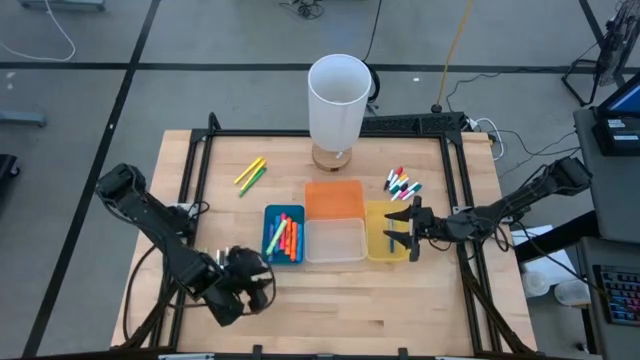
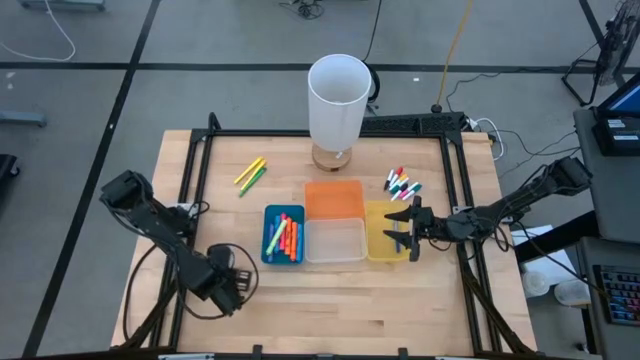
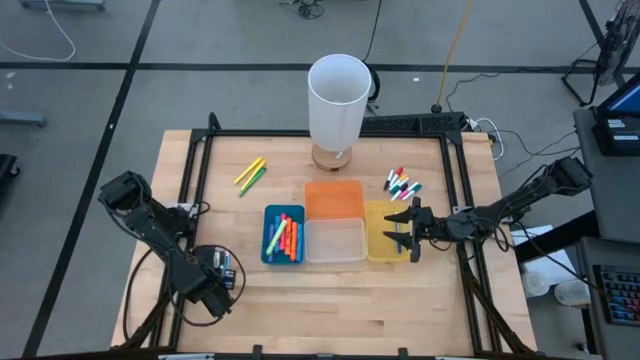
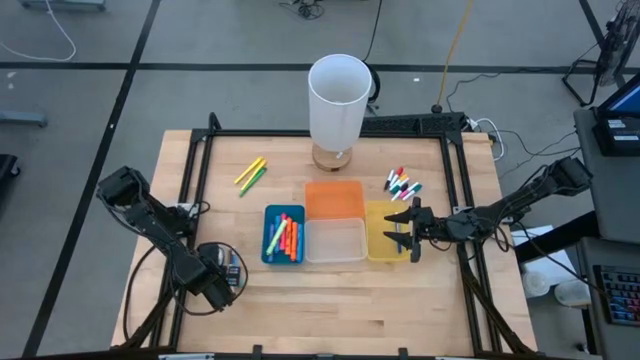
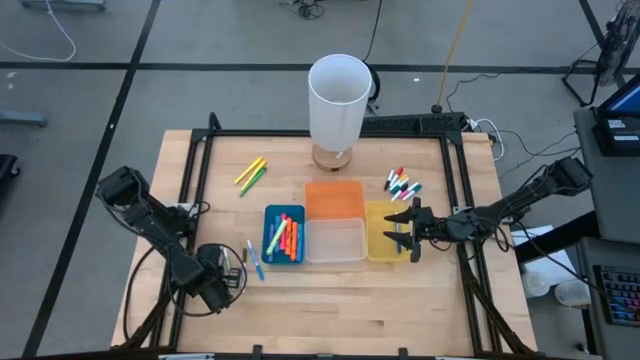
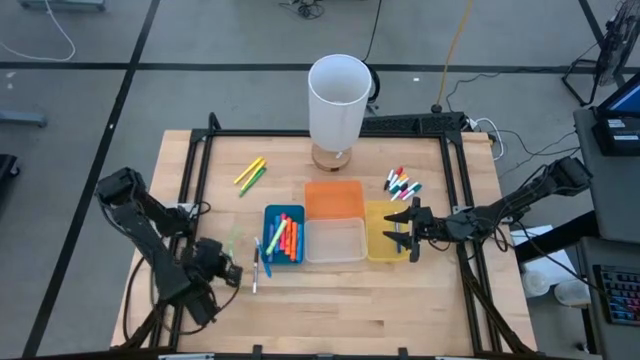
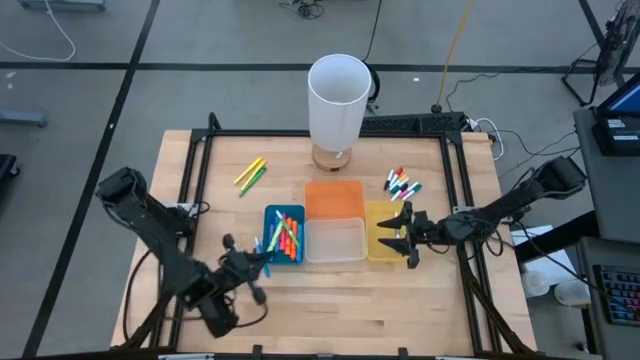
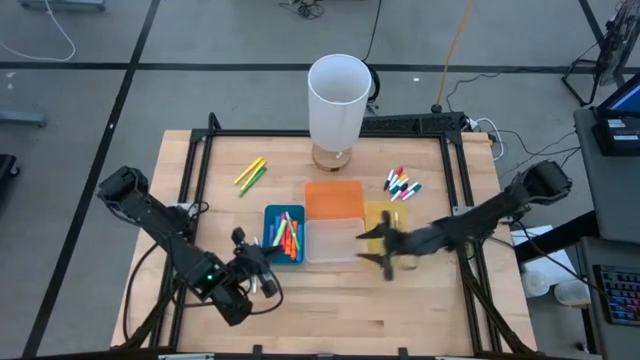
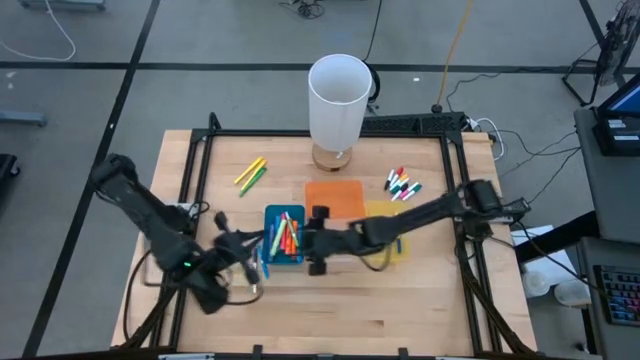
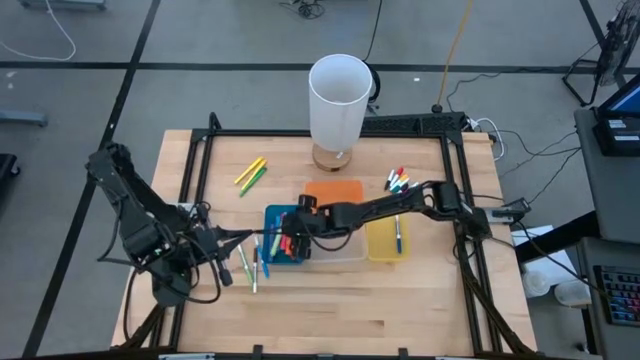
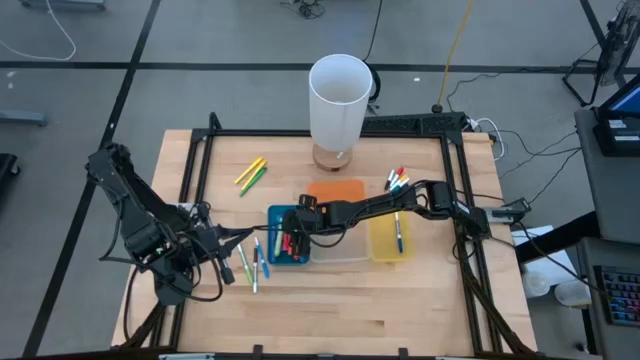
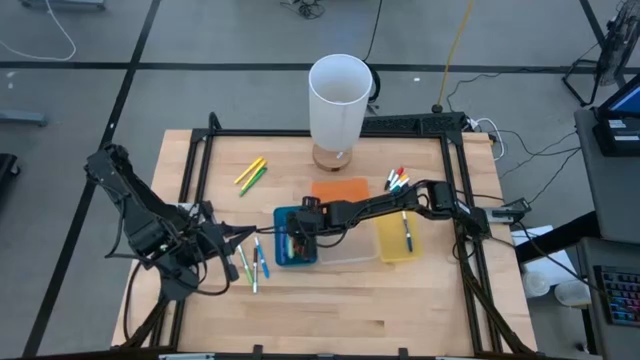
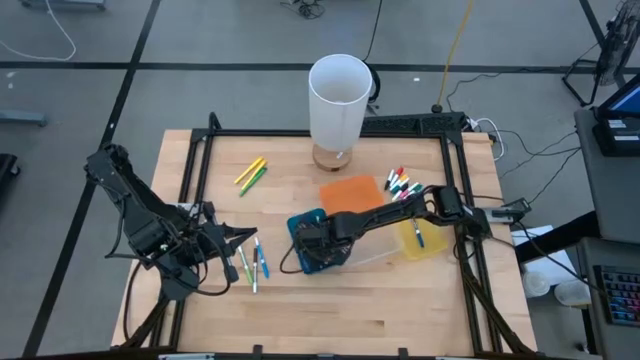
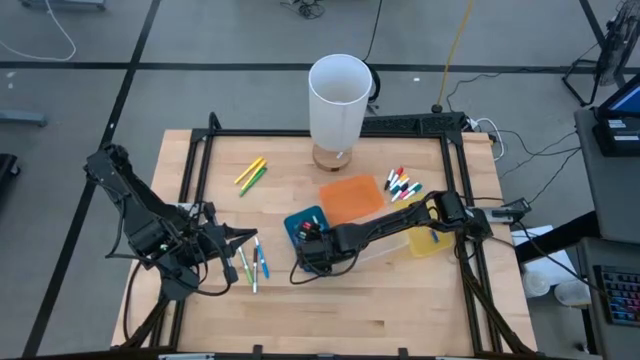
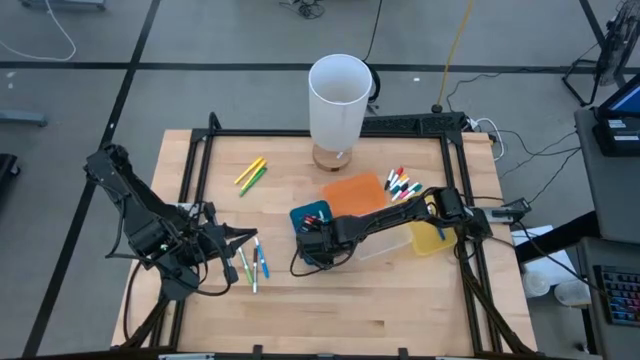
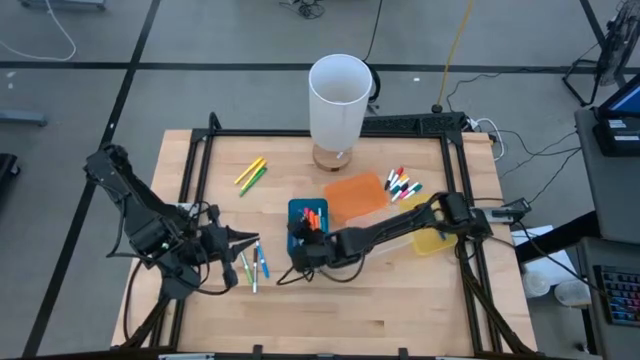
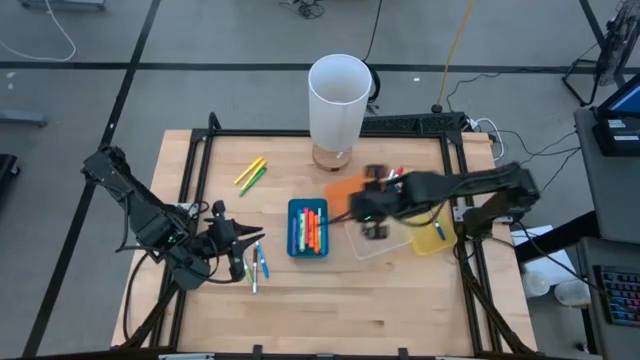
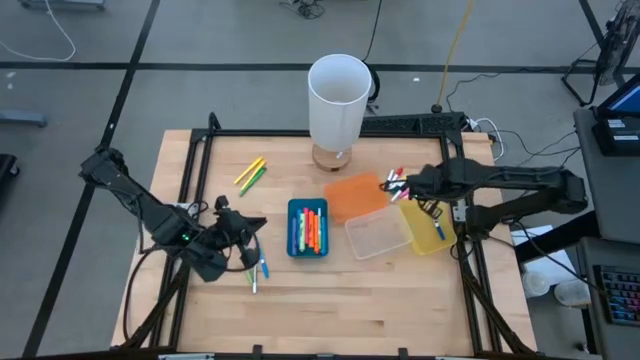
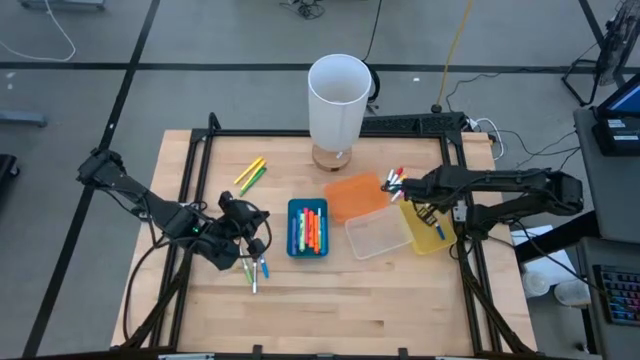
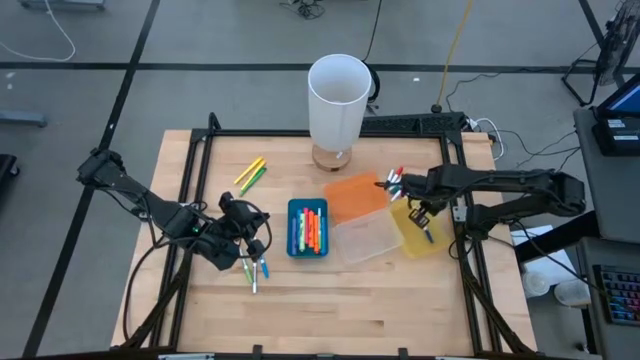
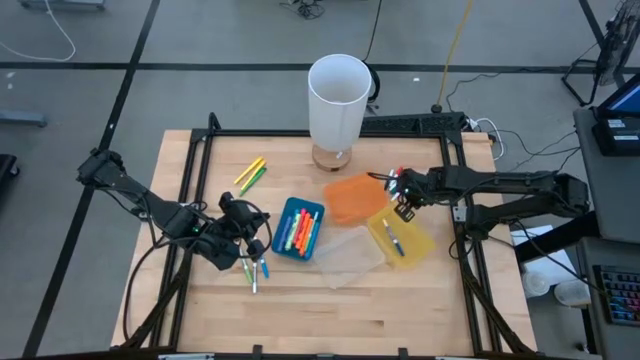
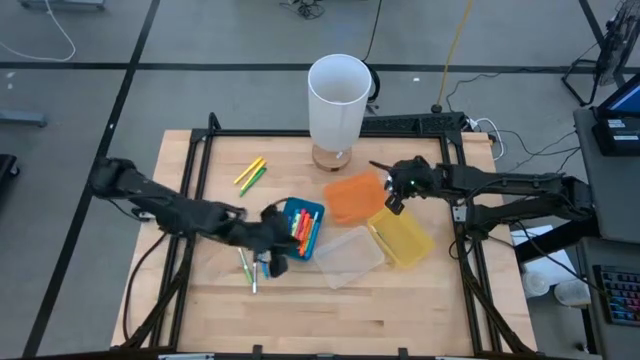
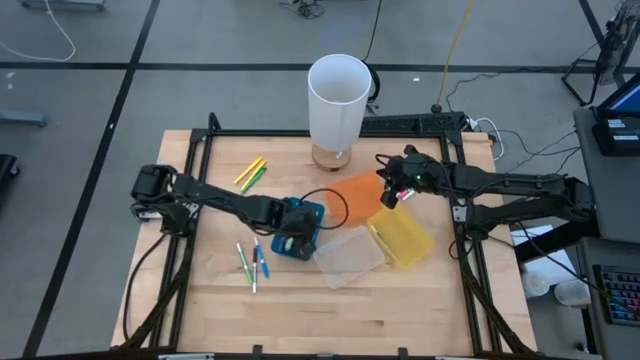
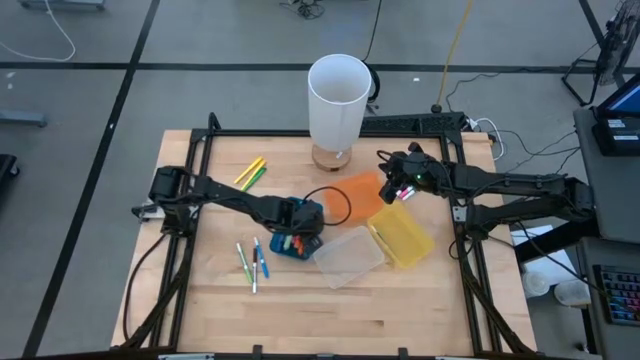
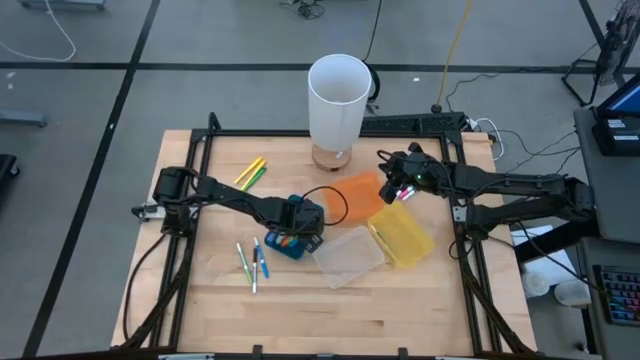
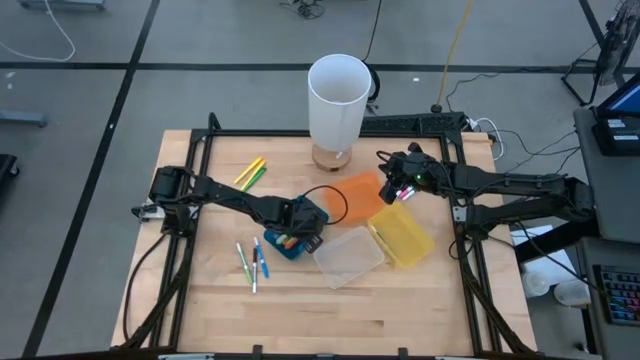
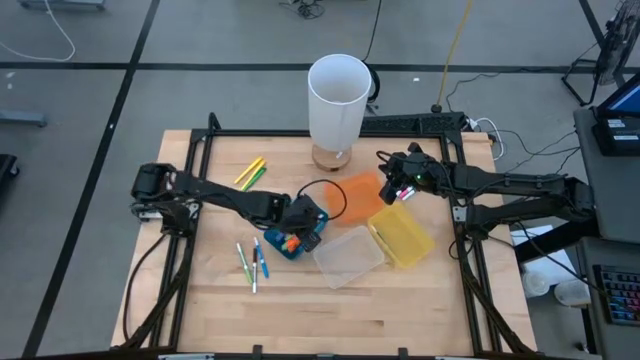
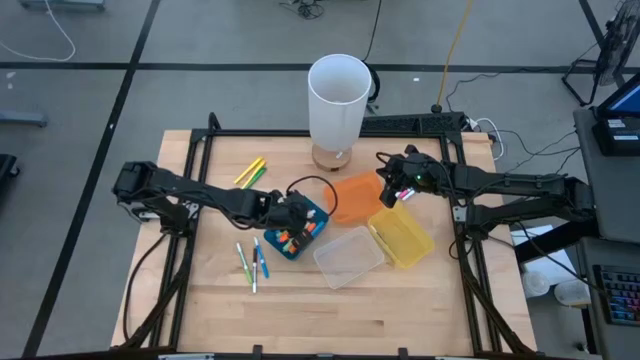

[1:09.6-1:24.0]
Task: Pick & Place Markers
Put the left green marker pen into the yellow bin

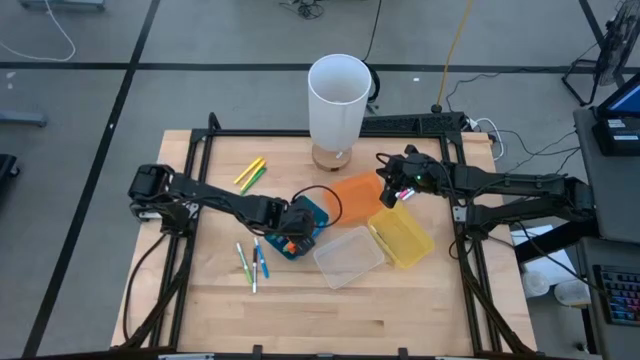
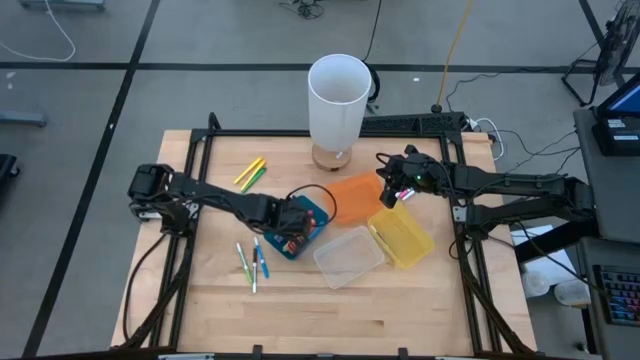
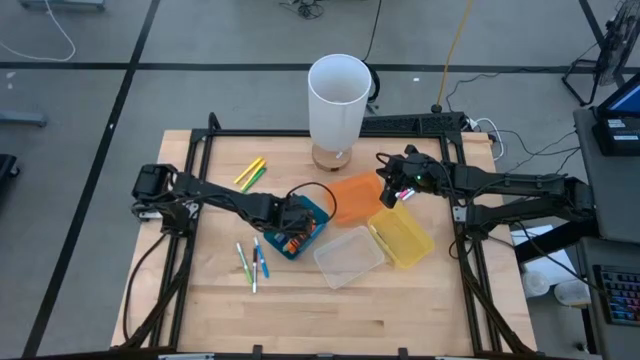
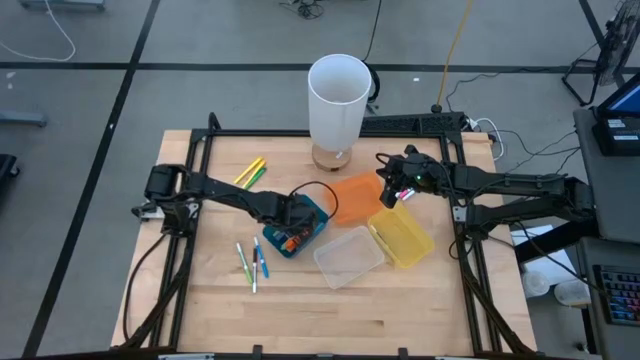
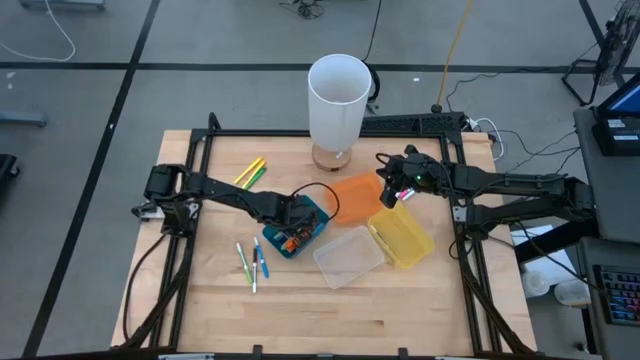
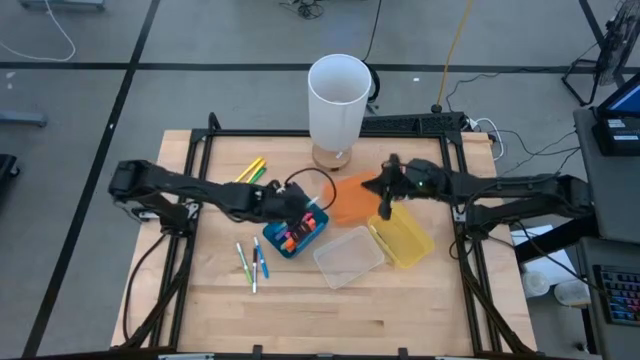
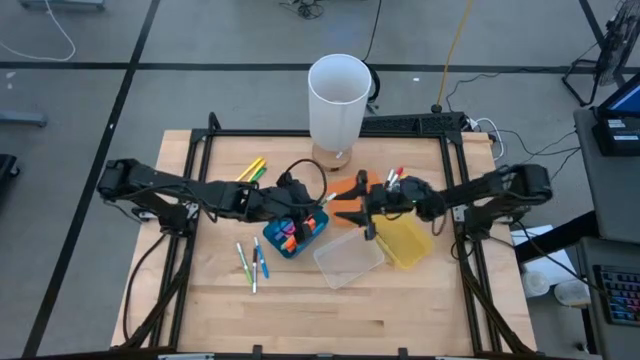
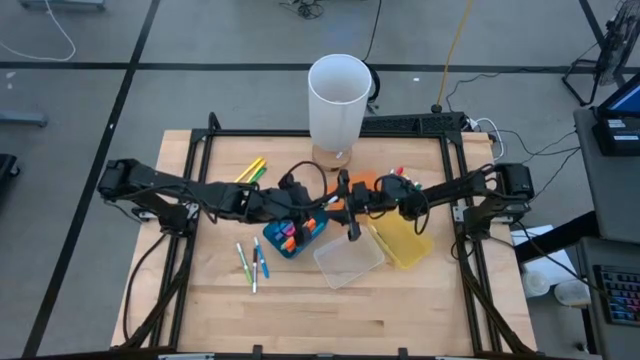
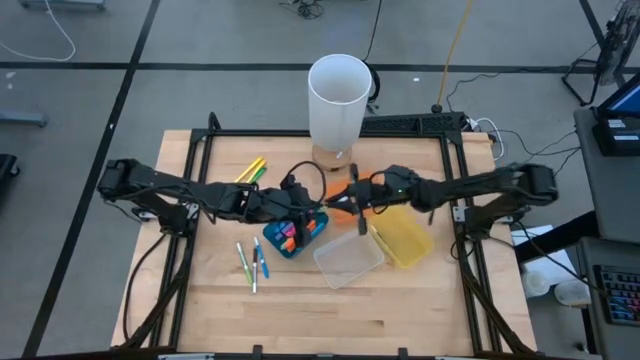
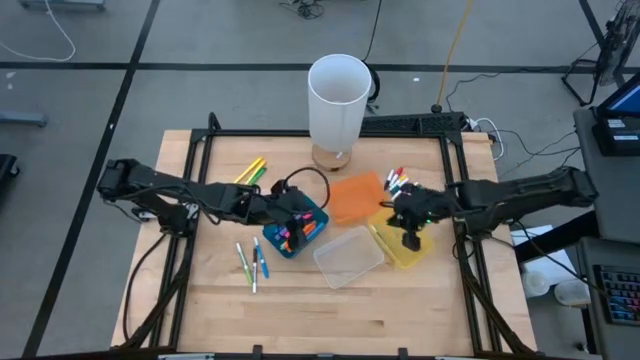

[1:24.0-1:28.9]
Put the left green marker pen into the yellow bin

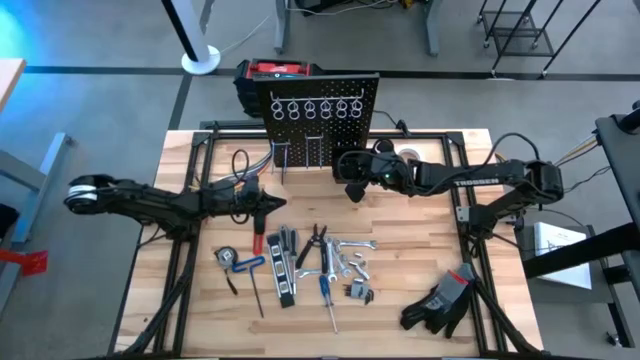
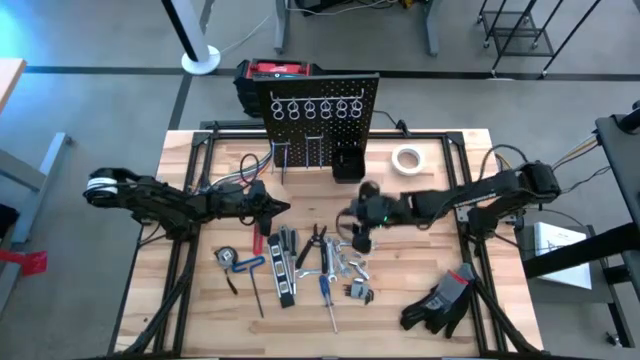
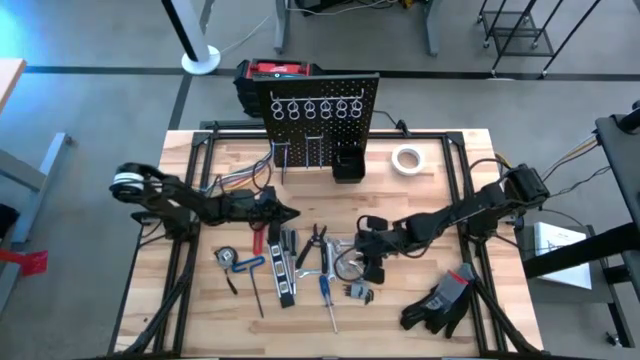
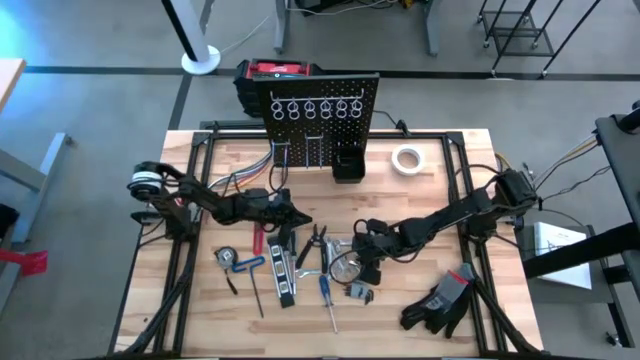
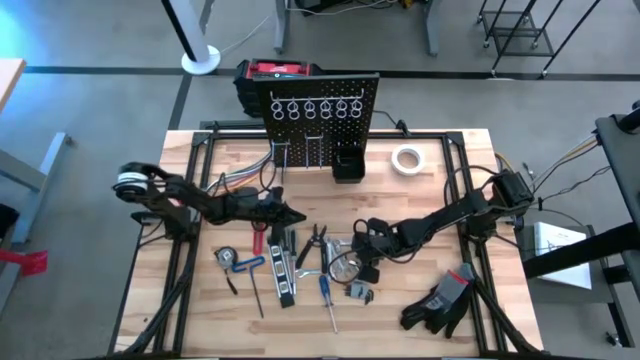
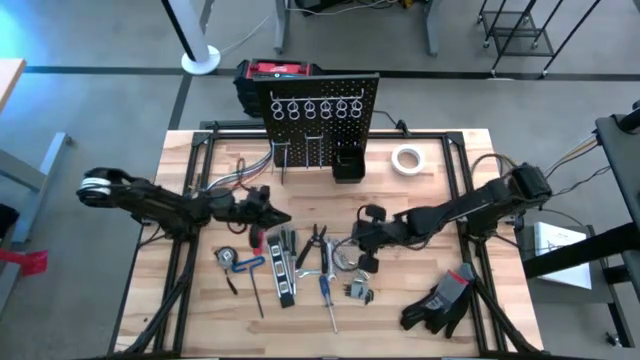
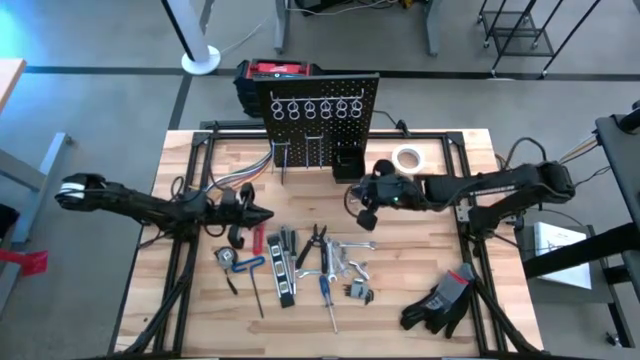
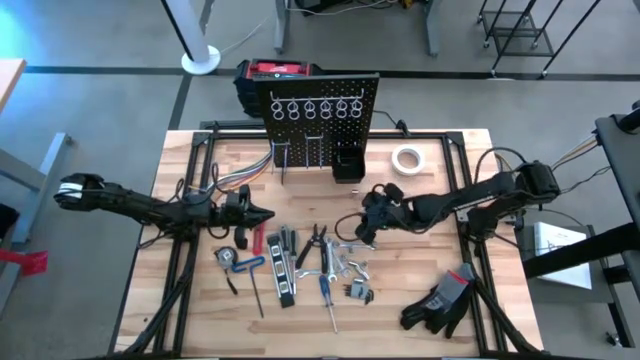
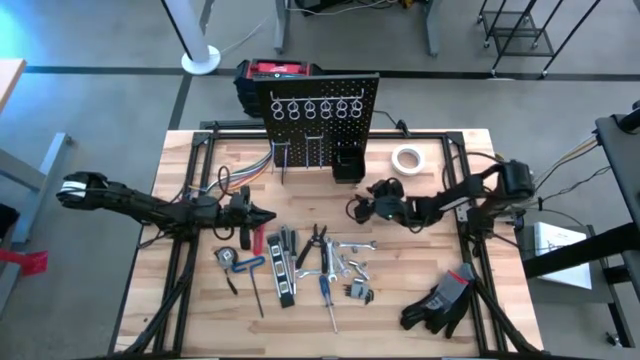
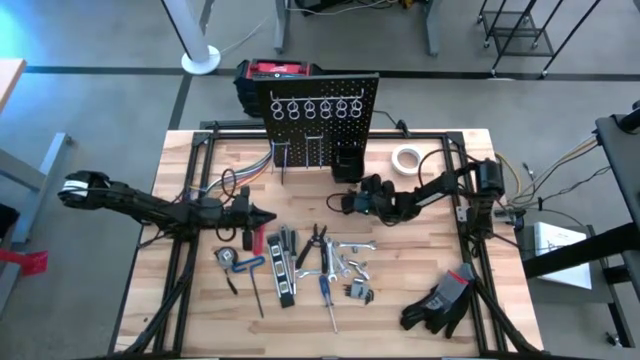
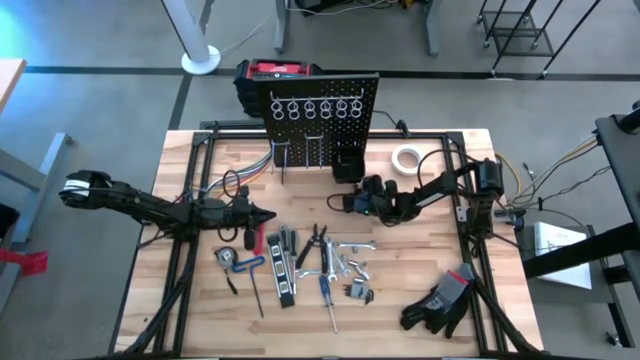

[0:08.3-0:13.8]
Task: Hang tools onto peg board
Put the socket into the black tool bin on the peg board
